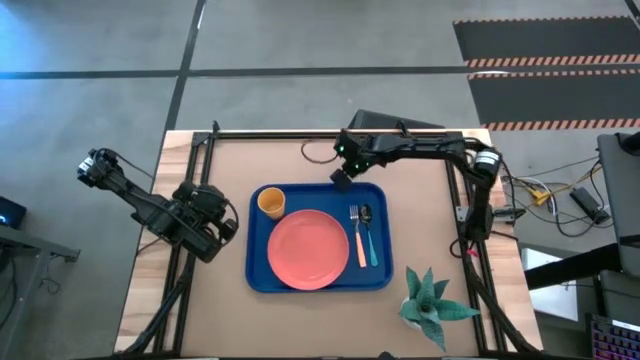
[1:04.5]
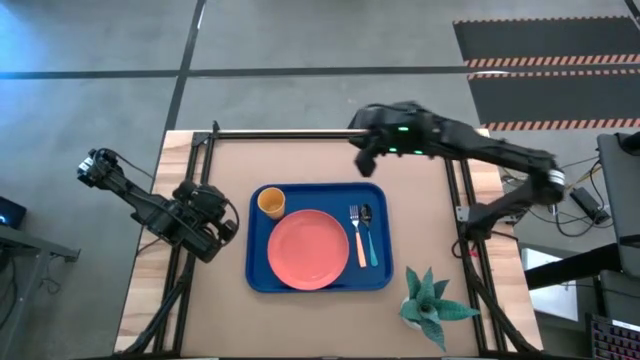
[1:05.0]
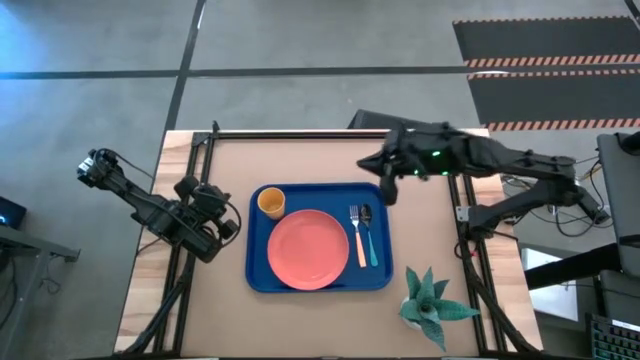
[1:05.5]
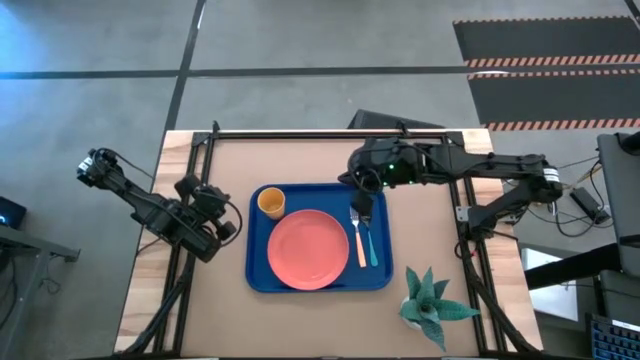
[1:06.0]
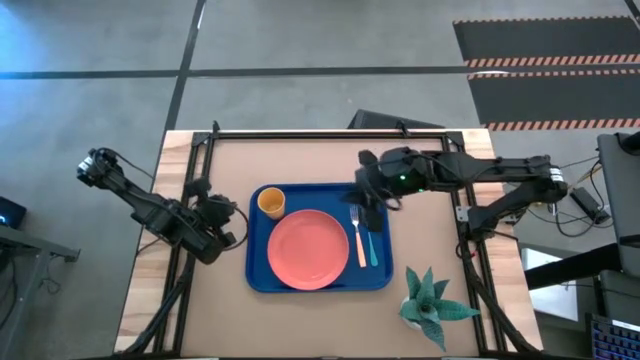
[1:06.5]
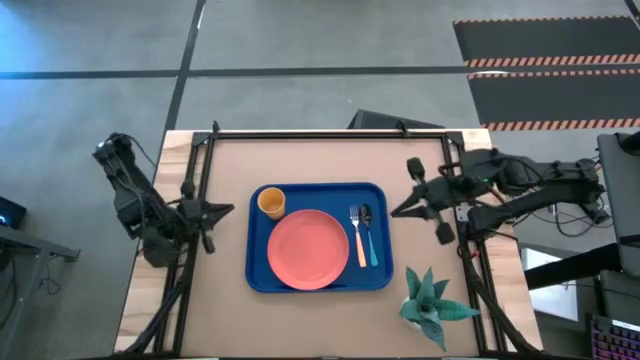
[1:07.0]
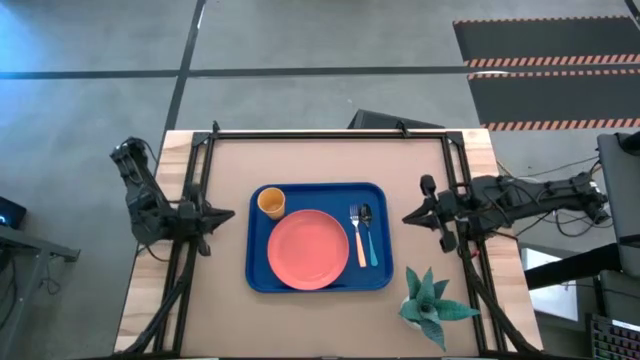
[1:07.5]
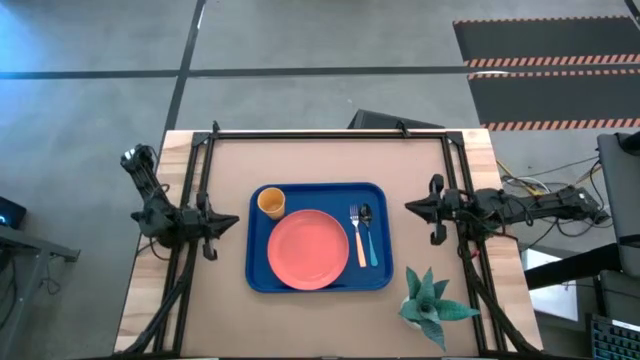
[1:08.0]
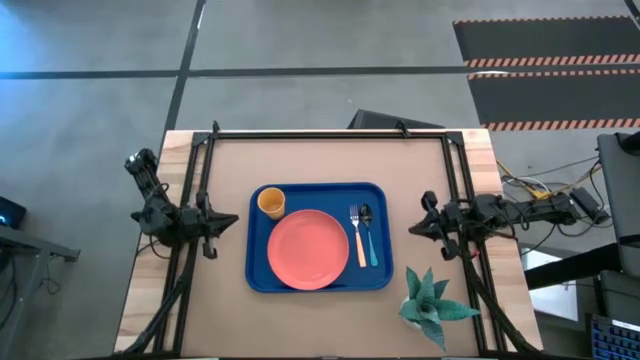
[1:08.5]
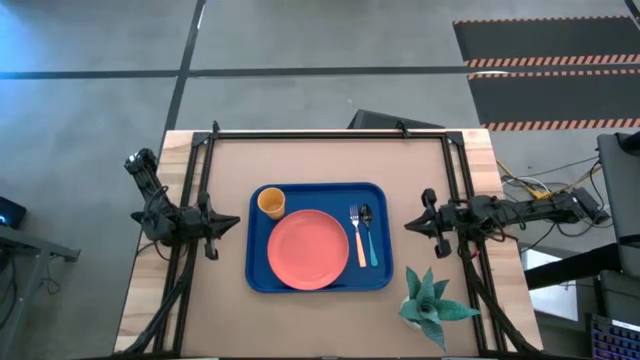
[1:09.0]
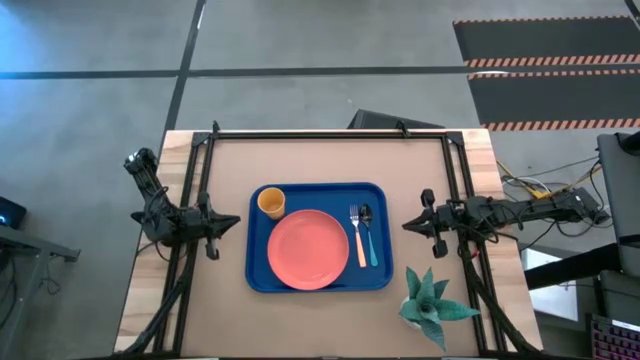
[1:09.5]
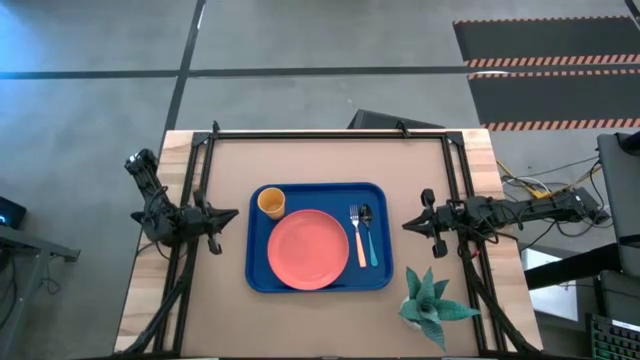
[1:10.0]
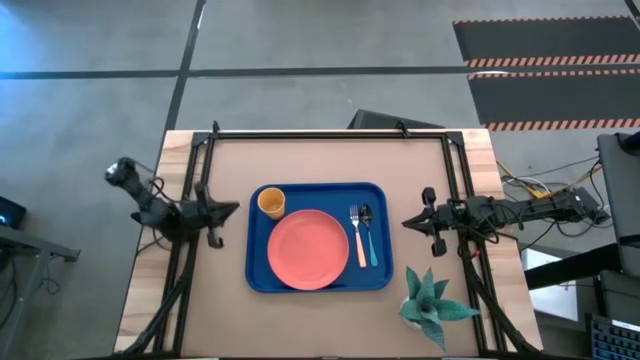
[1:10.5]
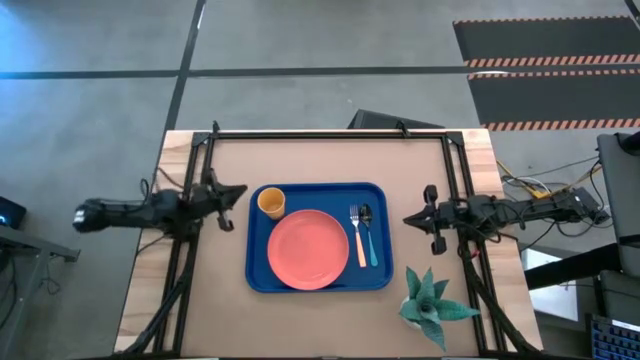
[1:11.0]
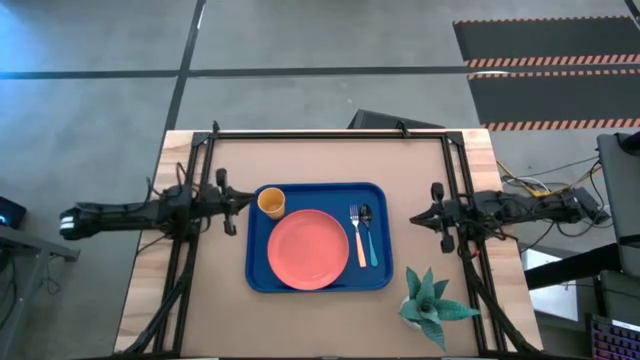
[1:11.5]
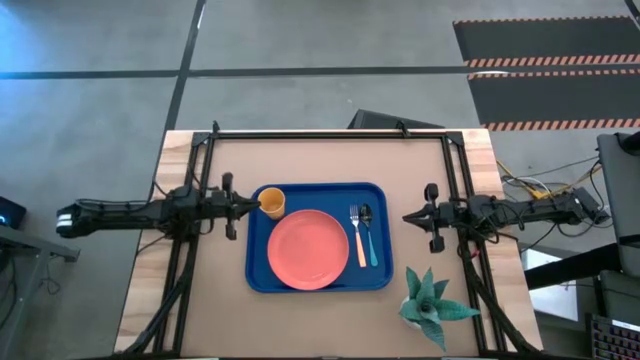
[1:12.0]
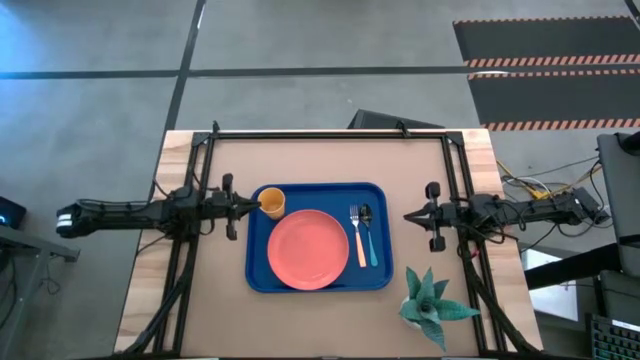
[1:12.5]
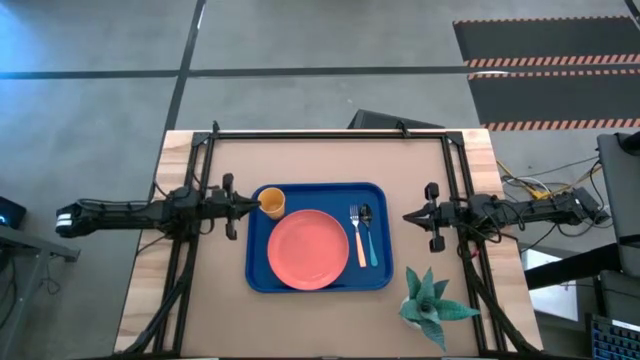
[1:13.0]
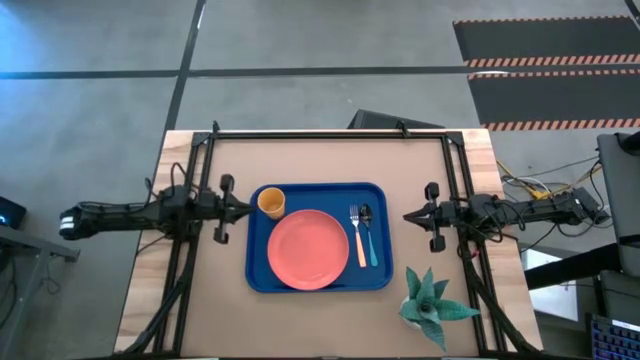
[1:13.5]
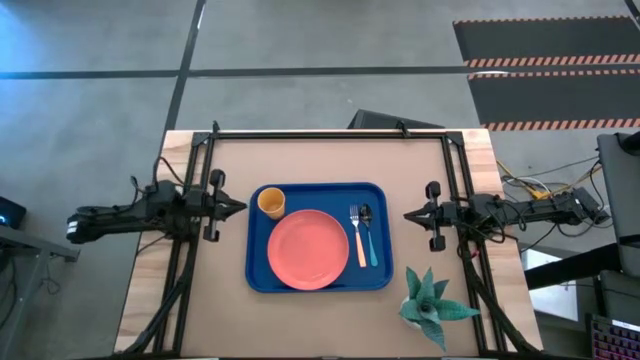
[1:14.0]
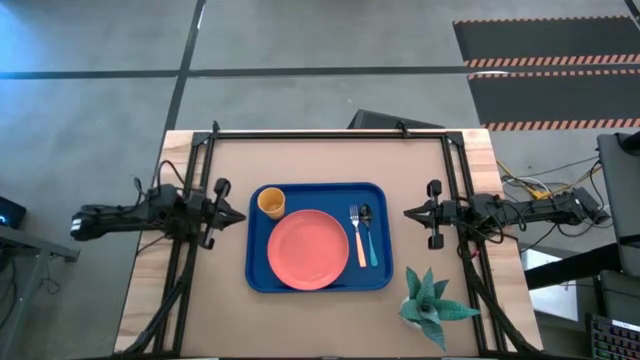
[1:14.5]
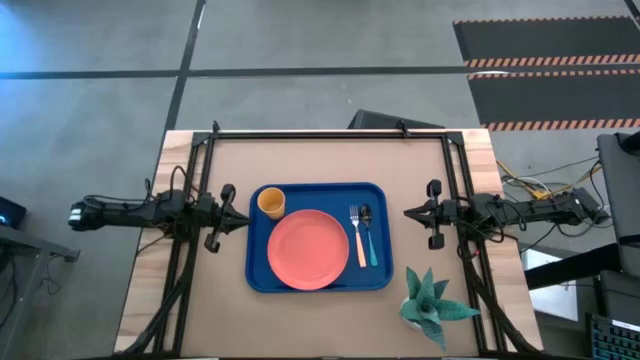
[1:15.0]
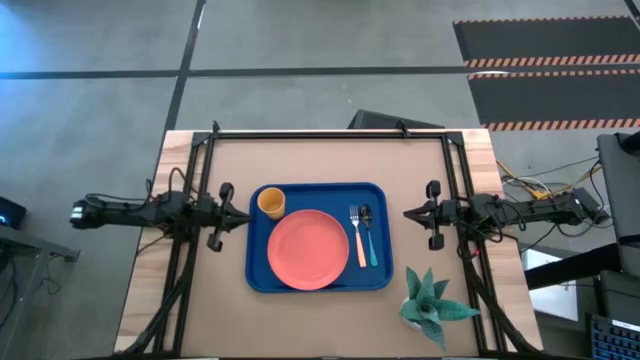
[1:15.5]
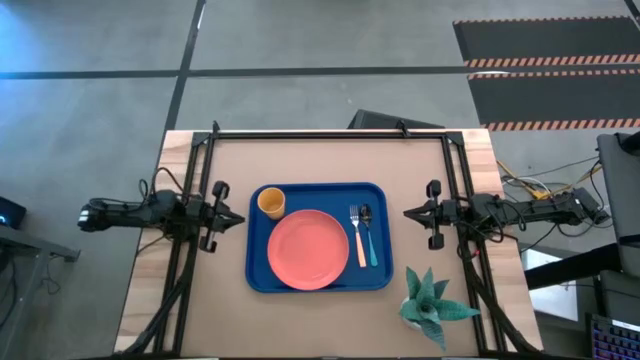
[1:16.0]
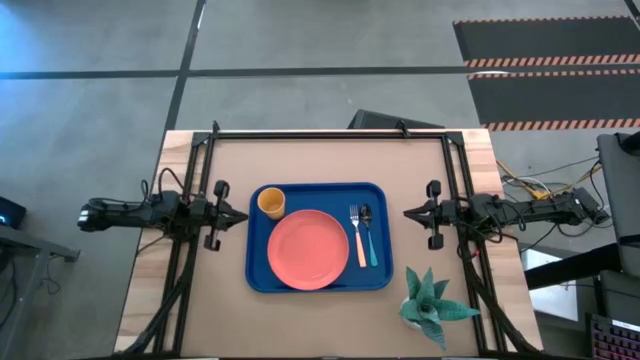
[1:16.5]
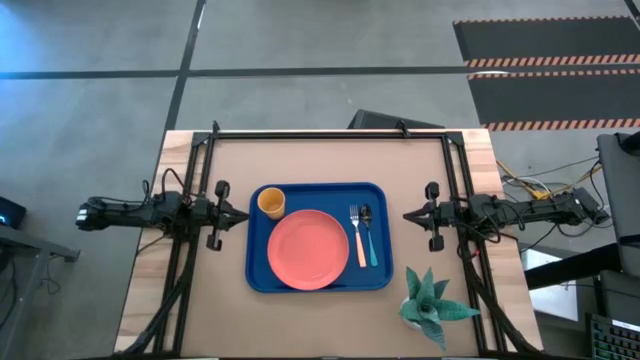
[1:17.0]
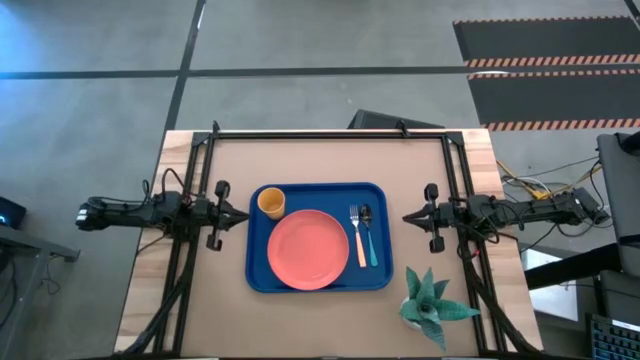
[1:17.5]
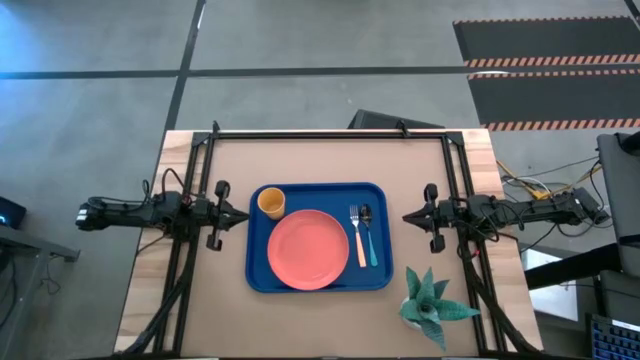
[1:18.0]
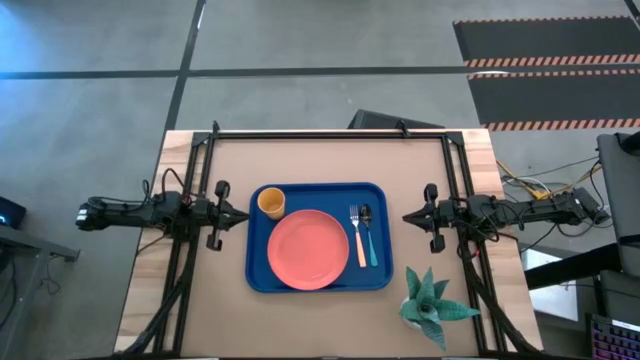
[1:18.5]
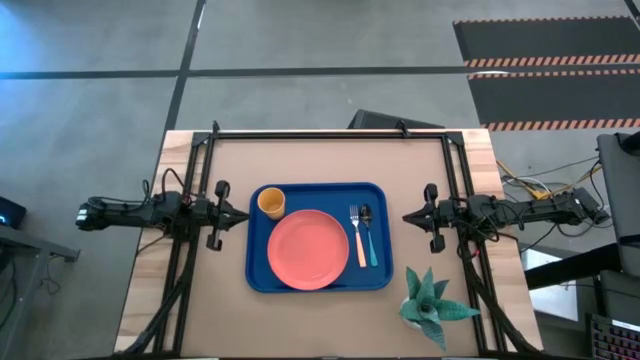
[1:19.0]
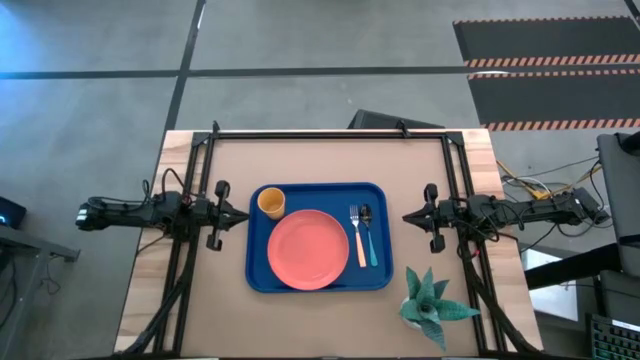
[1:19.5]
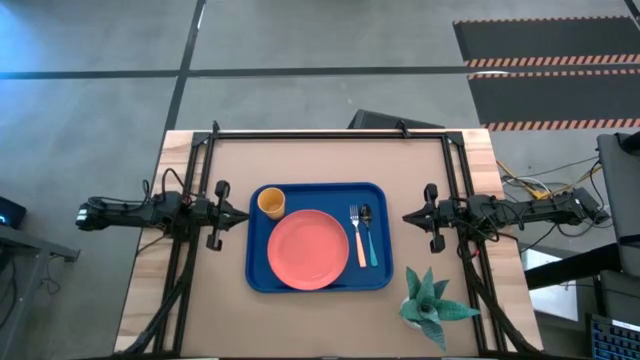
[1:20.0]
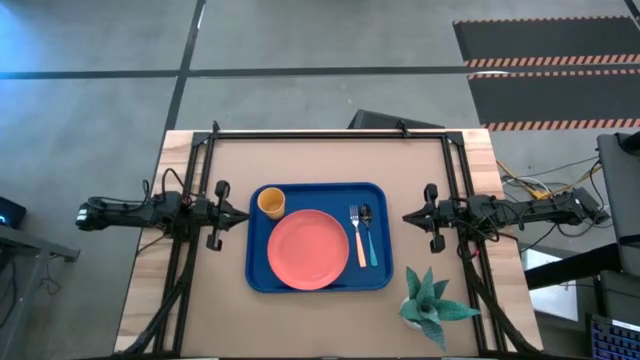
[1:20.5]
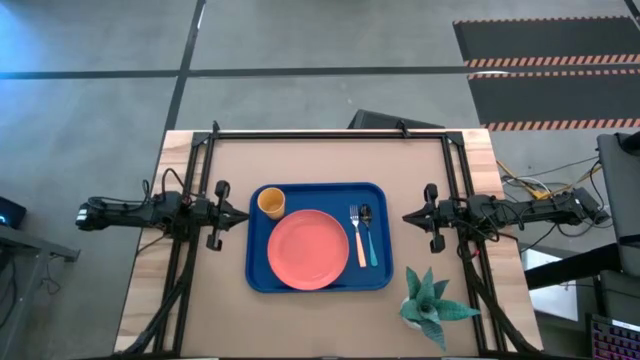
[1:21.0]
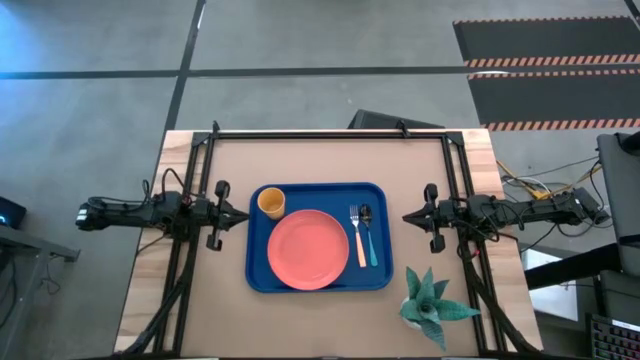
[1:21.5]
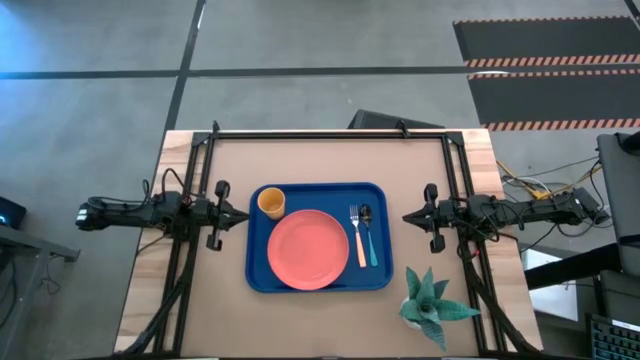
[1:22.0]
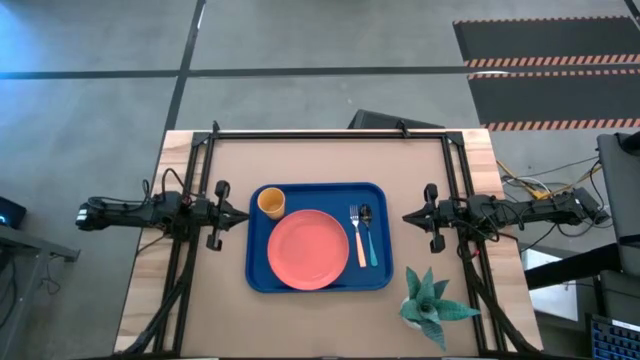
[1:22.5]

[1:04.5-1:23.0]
Task: Pick and place plate/cup/fork/spoon on tray
Return to Home Position

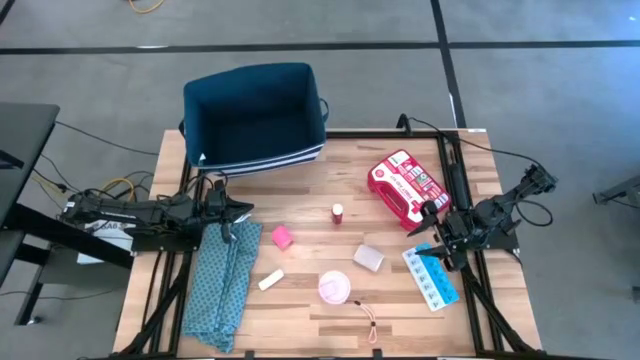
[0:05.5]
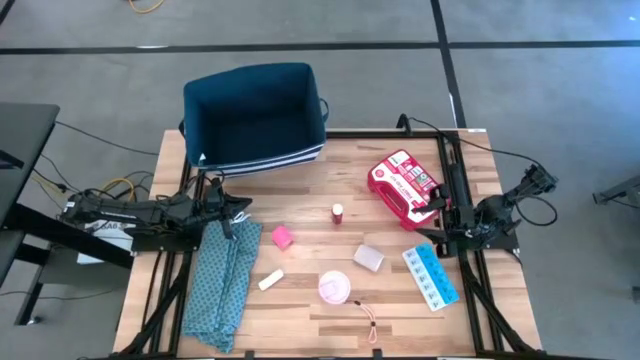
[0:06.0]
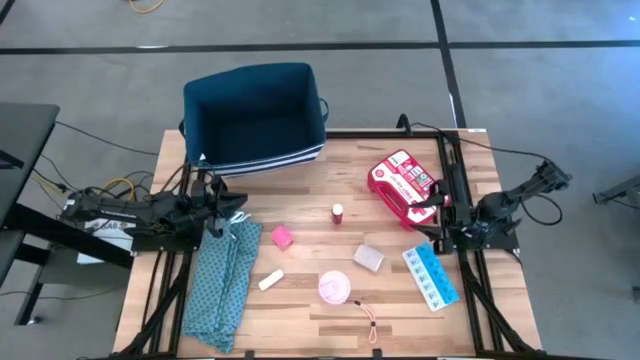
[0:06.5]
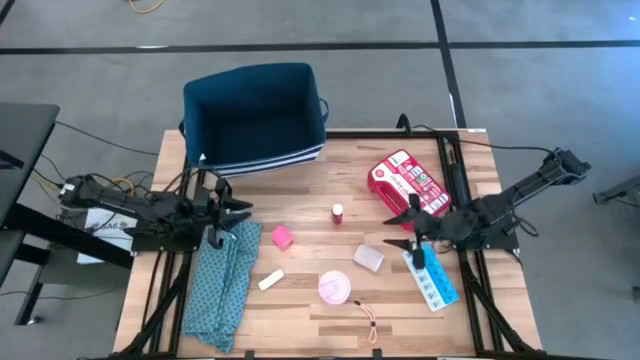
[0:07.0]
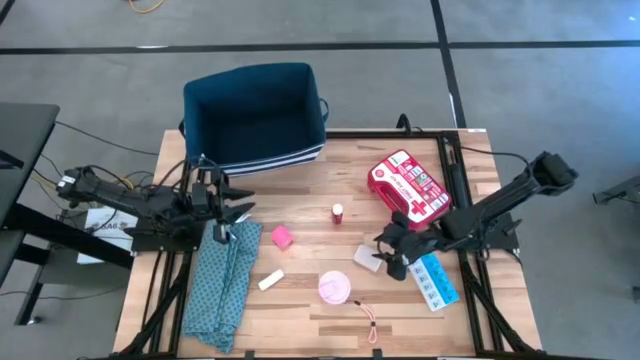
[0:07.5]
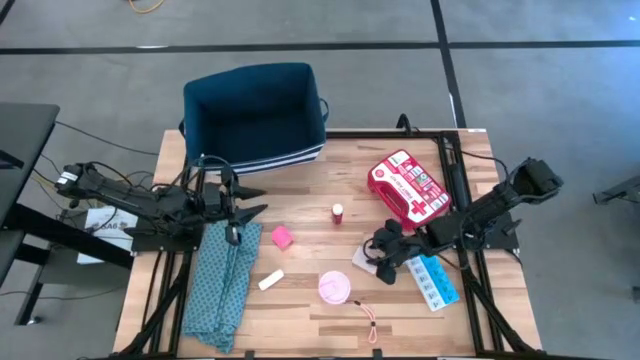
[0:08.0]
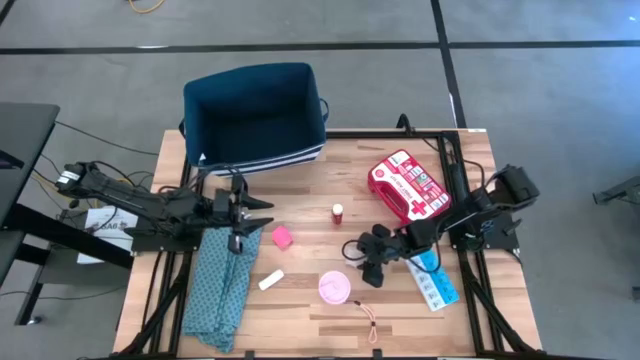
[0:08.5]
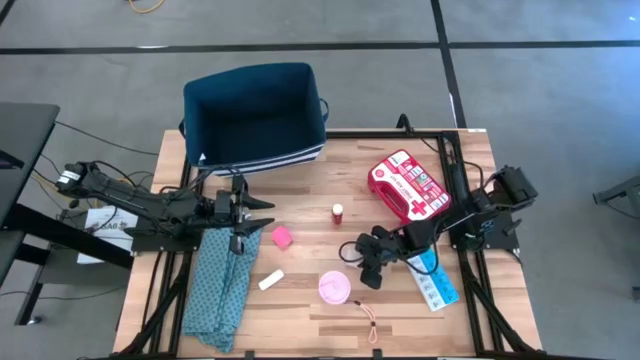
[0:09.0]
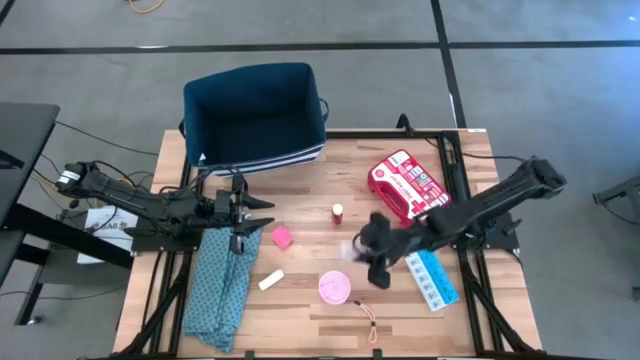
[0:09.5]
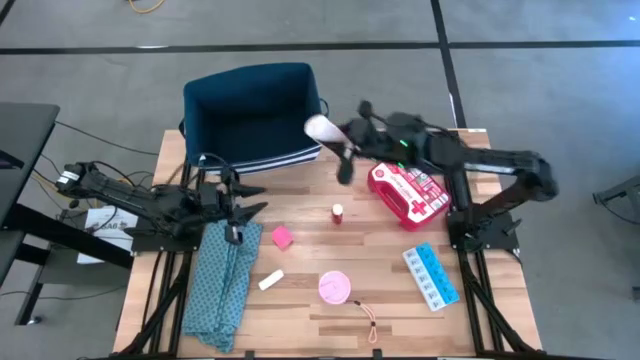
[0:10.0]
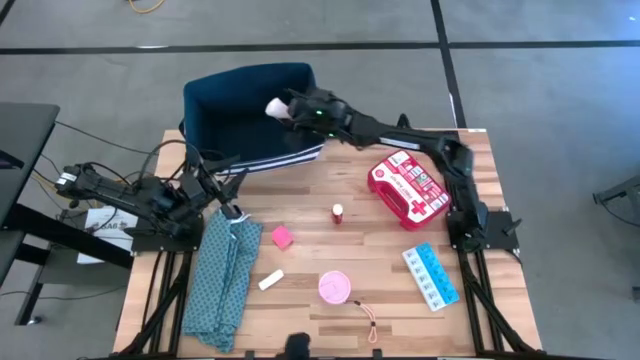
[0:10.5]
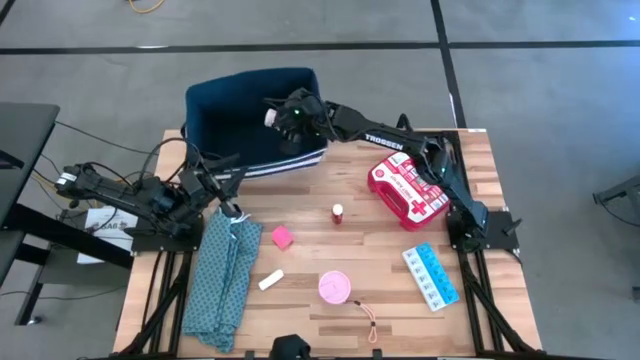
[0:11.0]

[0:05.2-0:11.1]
Task: Pick & place medical supplies in basket/bin
Put the white rolled bandage into theblue bin
